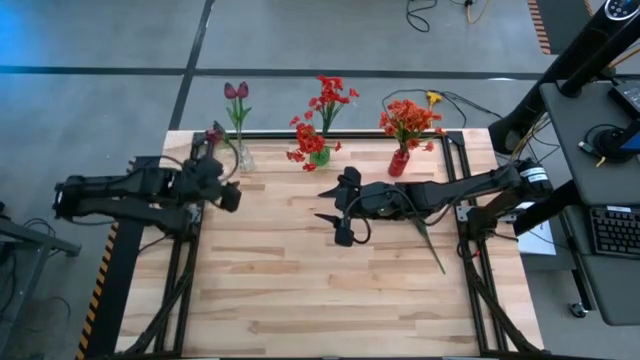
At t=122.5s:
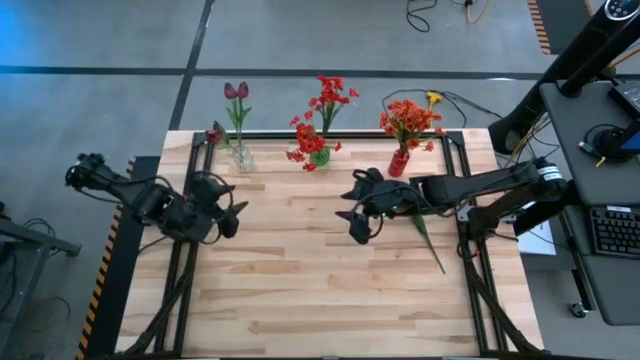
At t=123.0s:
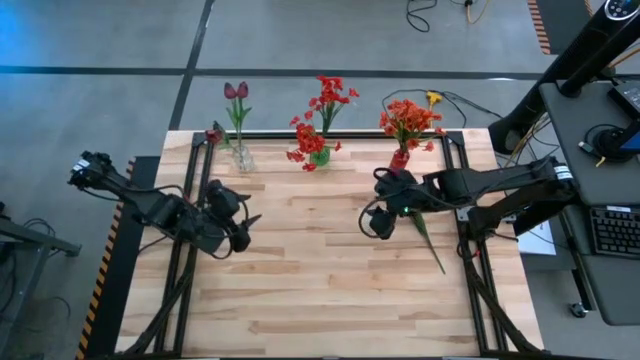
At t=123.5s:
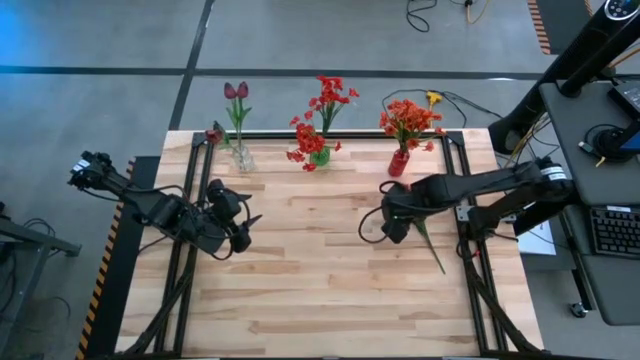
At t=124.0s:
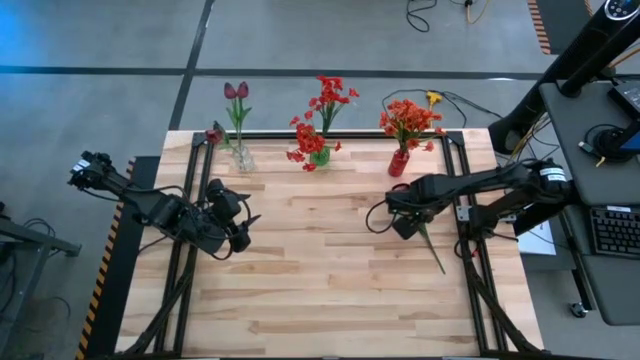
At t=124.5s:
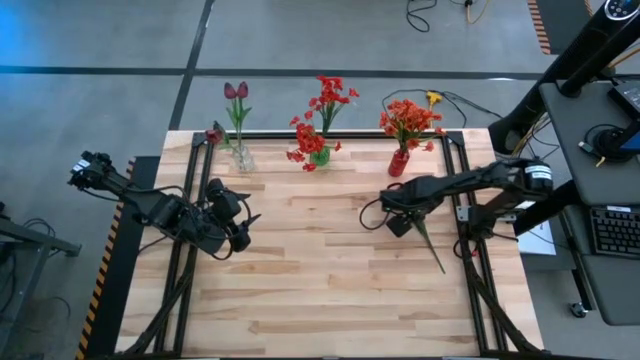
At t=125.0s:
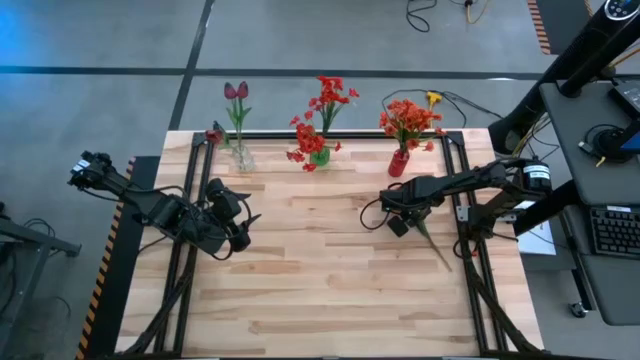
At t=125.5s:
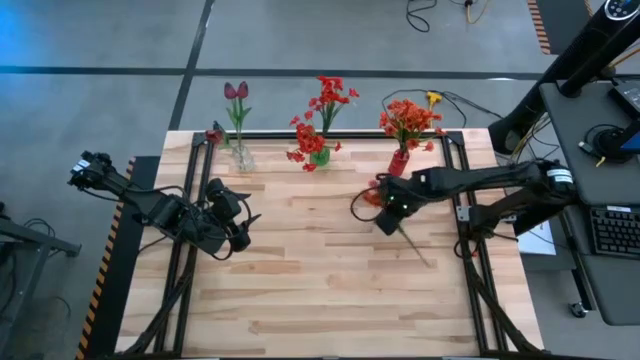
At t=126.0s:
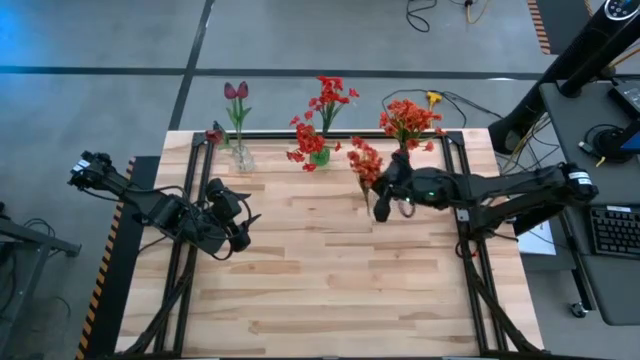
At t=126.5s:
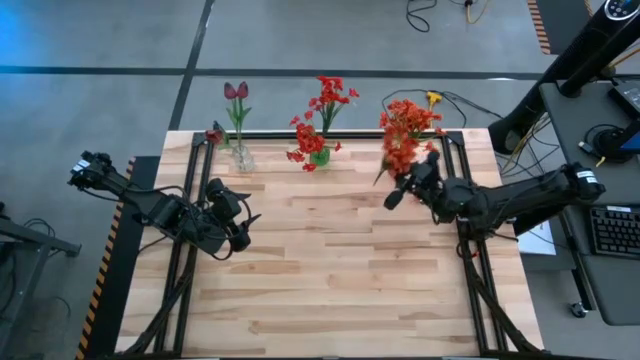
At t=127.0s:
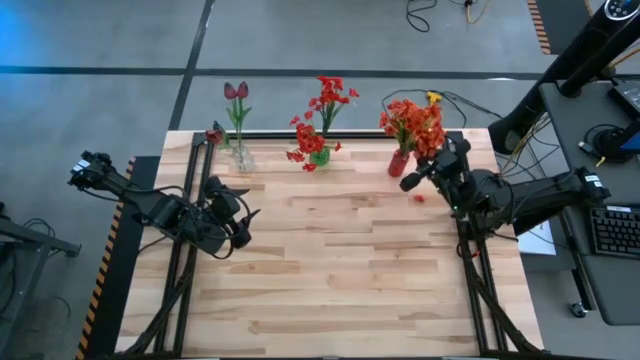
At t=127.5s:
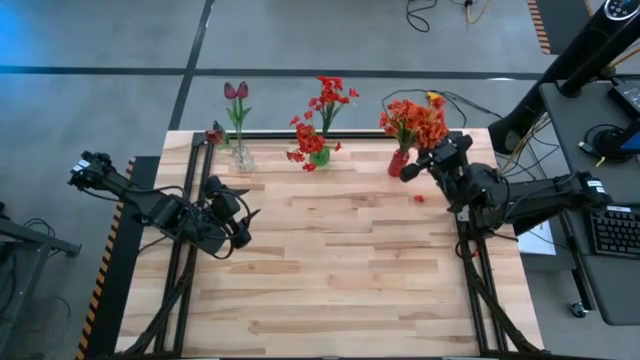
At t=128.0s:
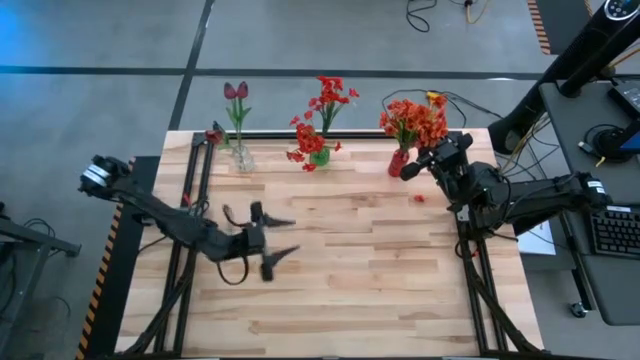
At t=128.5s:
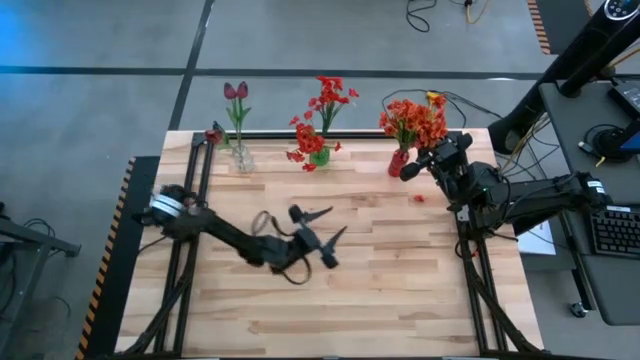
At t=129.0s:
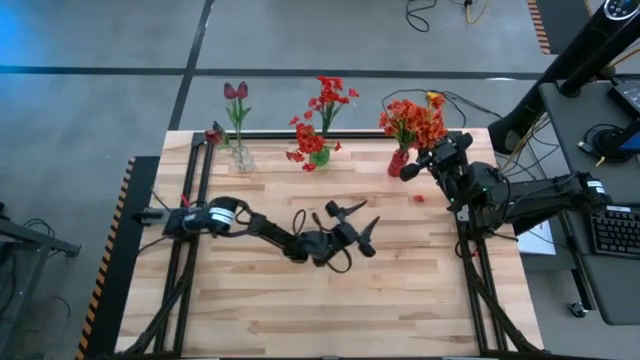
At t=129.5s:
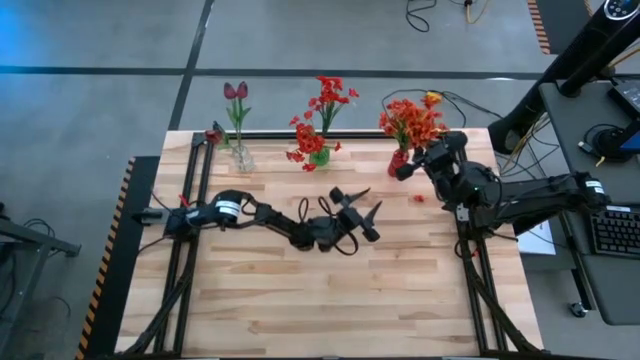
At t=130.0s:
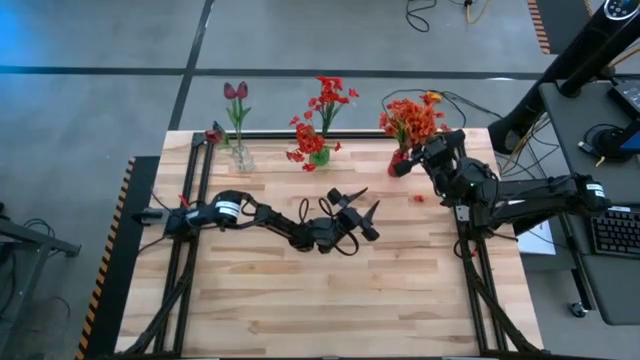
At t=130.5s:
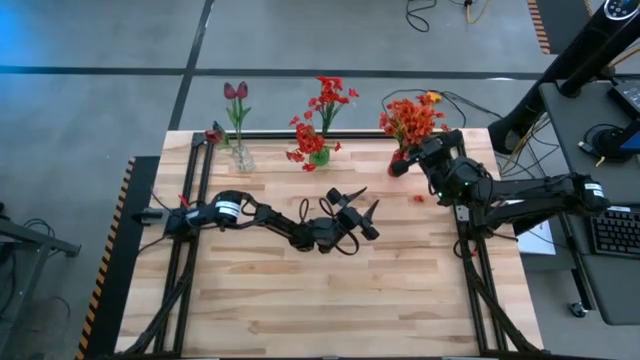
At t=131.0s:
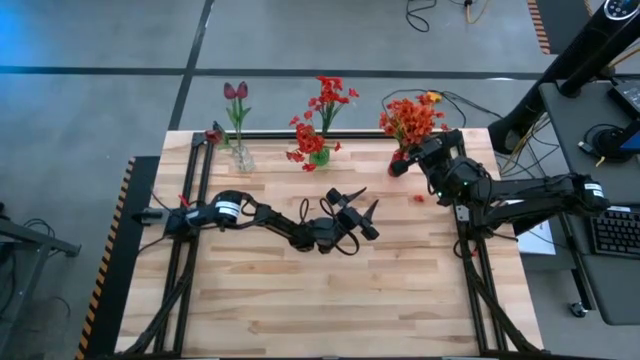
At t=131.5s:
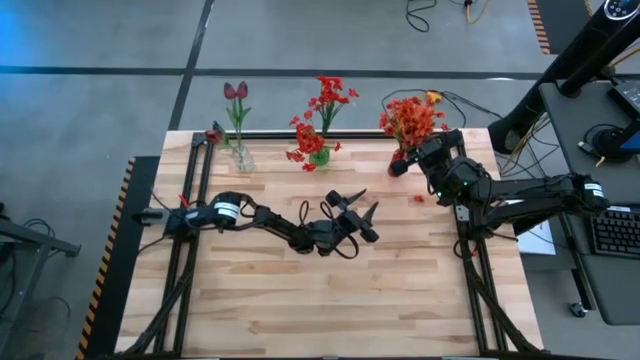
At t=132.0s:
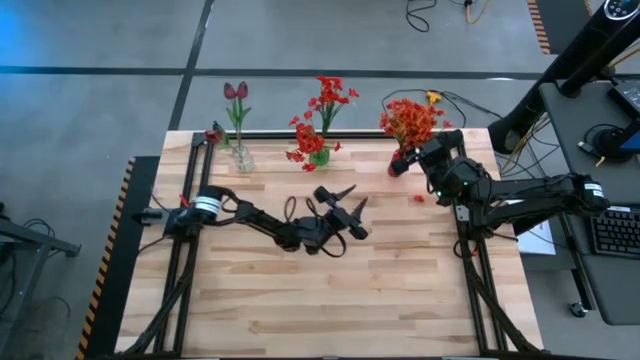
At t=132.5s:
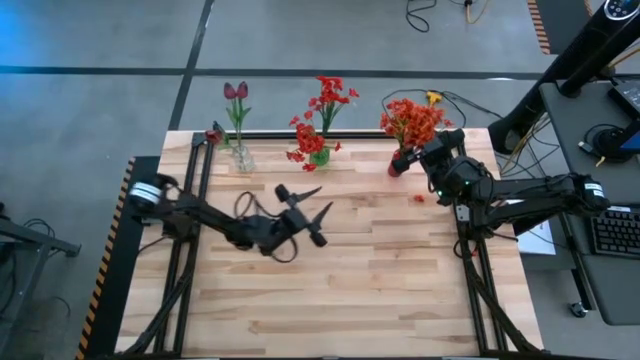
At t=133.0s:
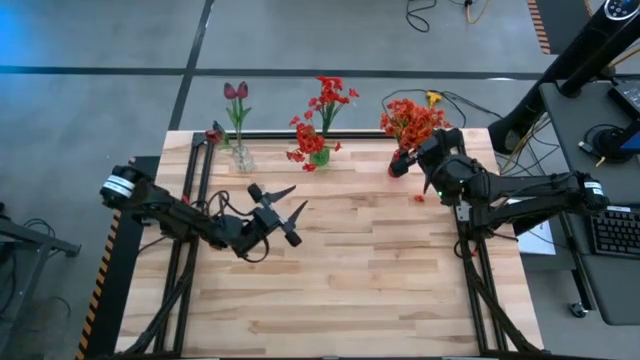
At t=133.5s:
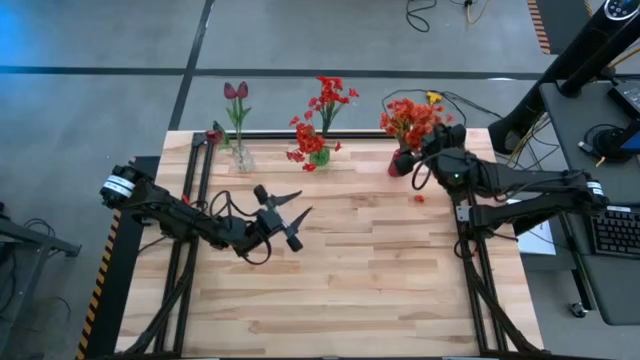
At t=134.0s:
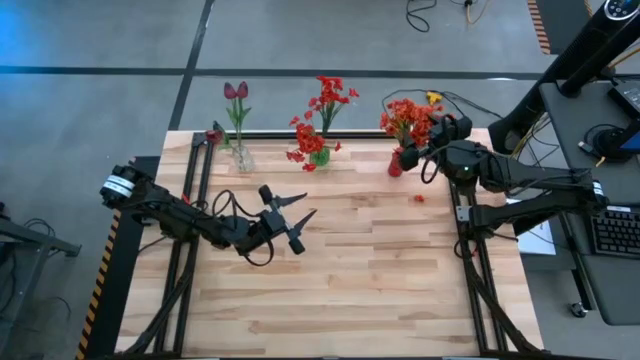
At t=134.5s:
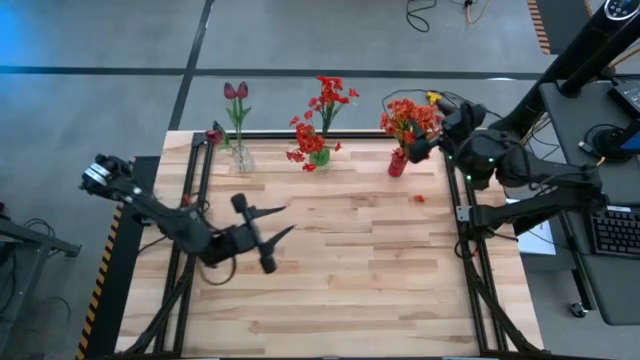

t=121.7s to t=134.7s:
Task: Sort flowers into vase by color
Put the orange flower into the red vase

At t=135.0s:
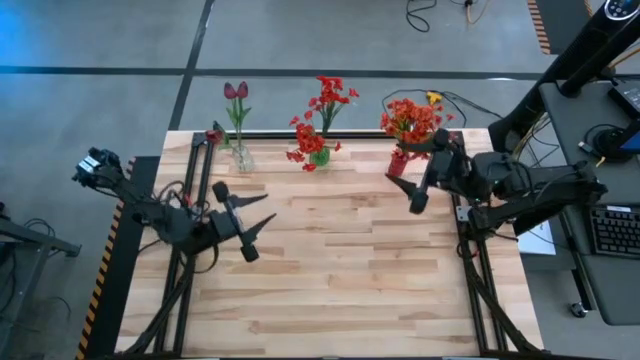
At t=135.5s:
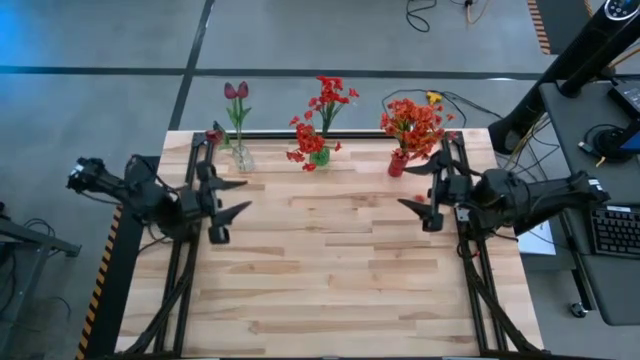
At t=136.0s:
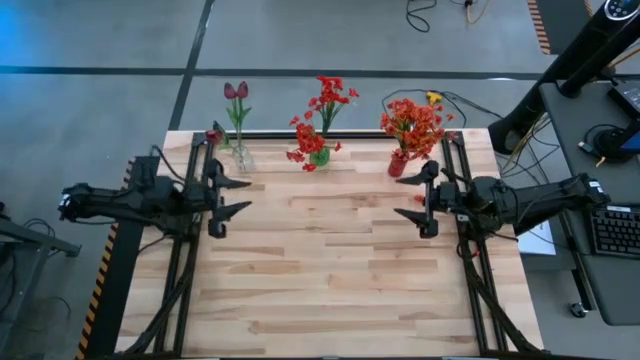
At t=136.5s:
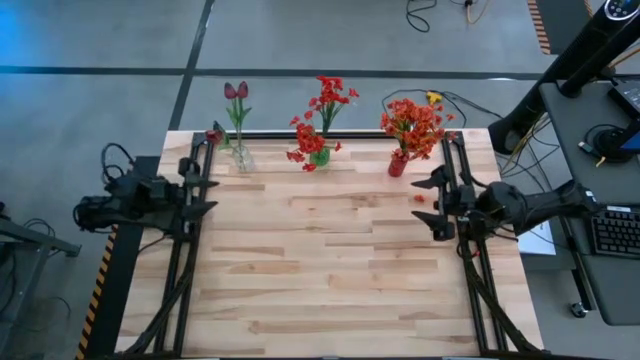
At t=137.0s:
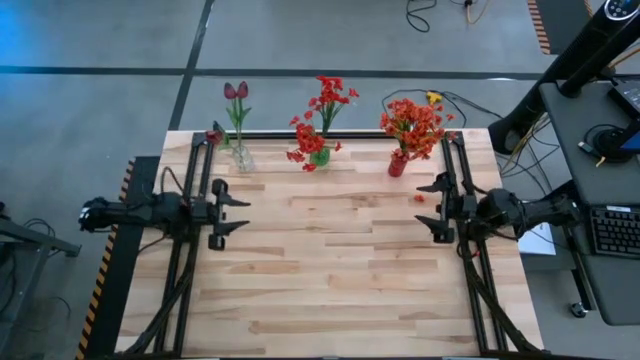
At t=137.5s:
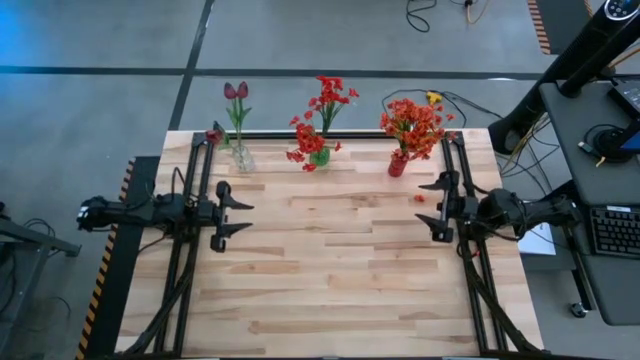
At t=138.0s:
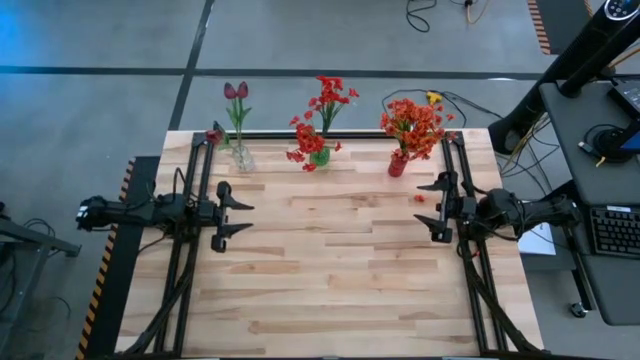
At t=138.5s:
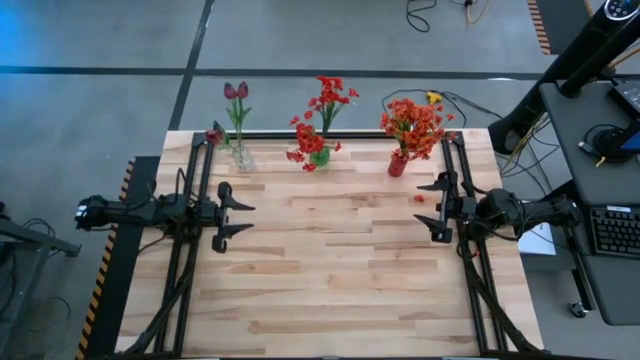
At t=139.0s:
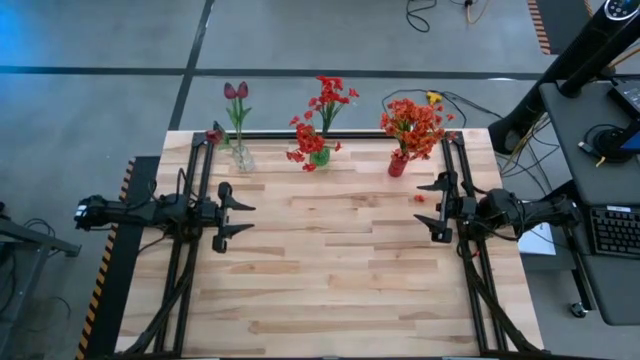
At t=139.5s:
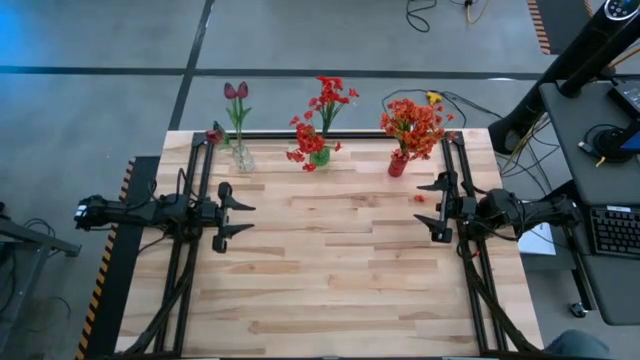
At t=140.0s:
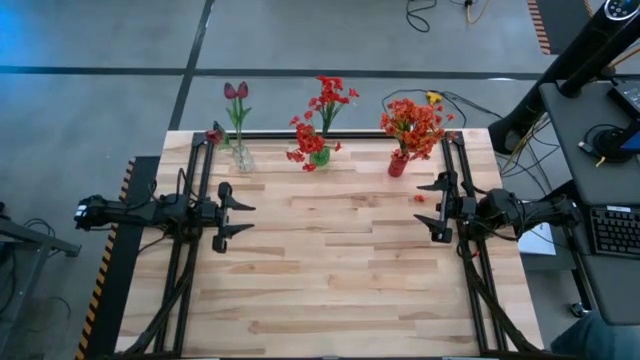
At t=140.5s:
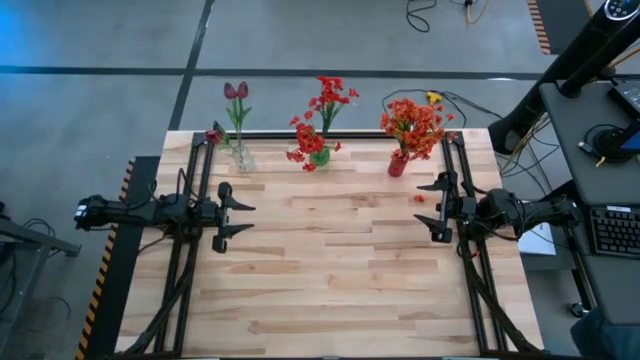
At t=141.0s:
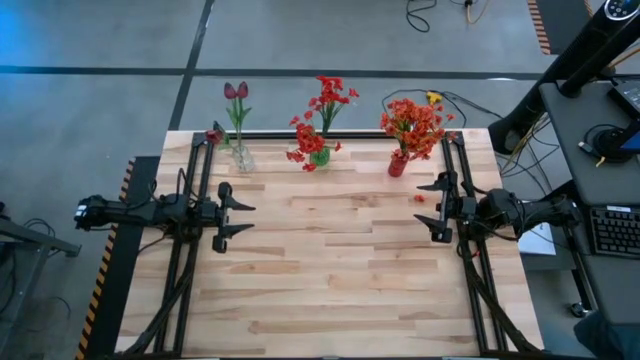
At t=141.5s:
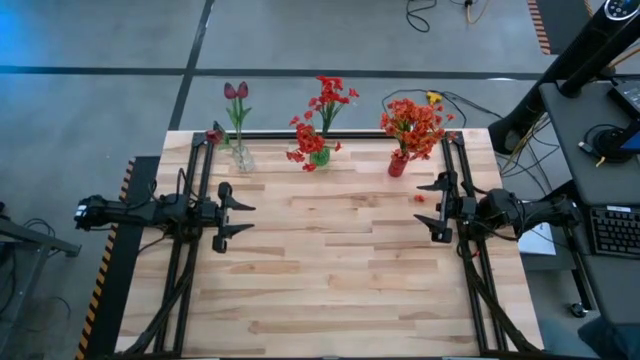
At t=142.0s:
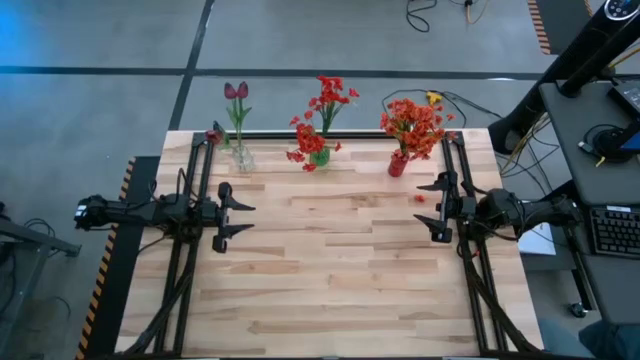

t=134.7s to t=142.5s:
Return to Home Position
